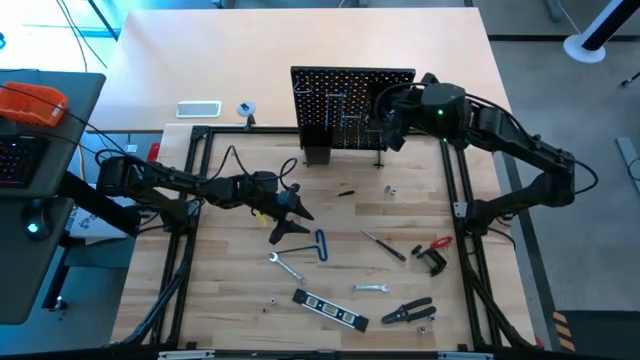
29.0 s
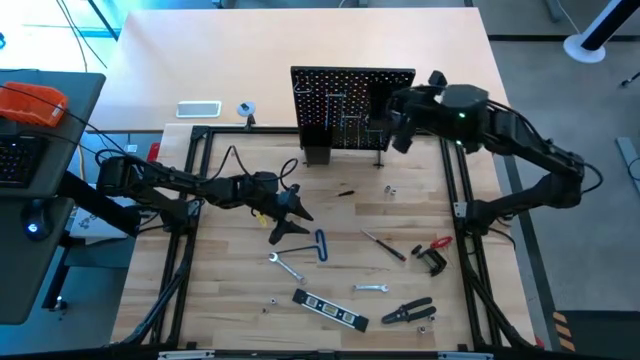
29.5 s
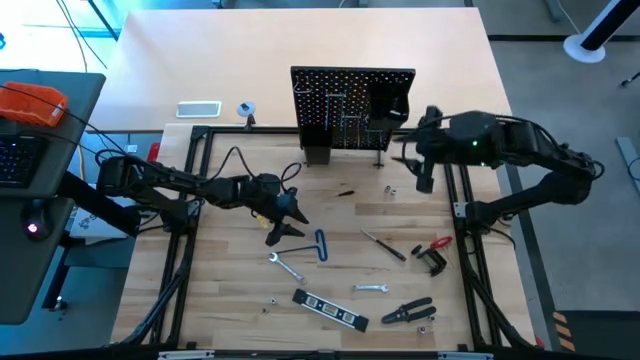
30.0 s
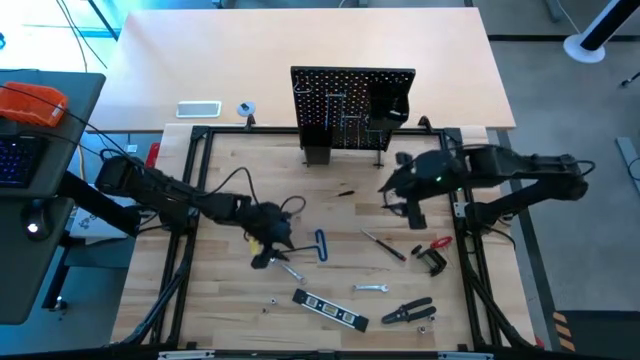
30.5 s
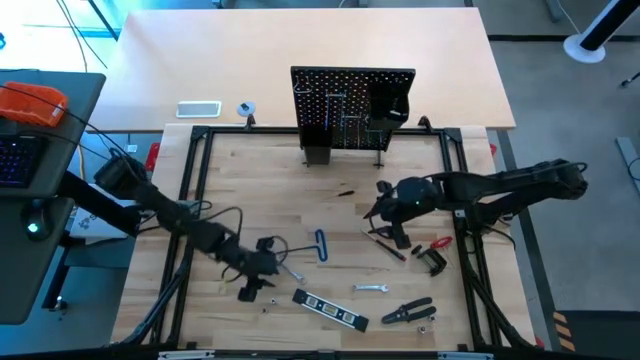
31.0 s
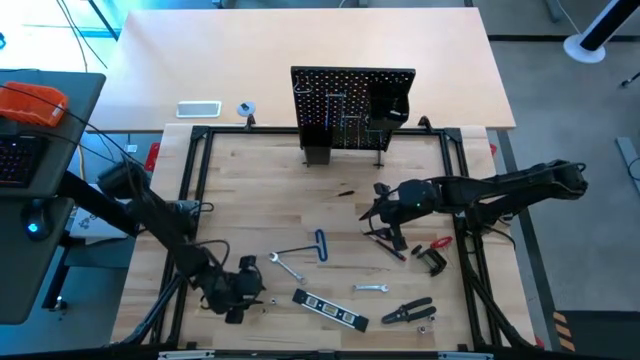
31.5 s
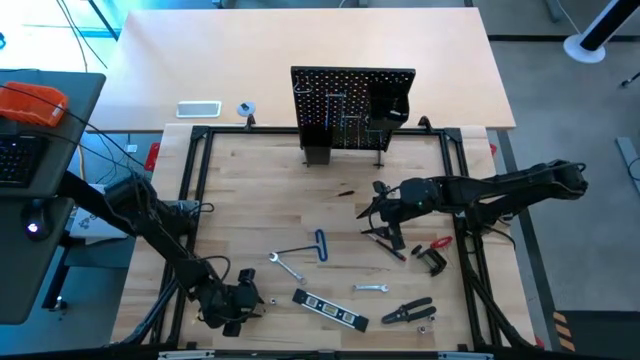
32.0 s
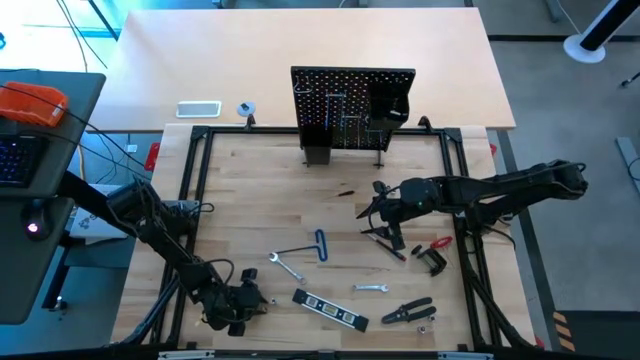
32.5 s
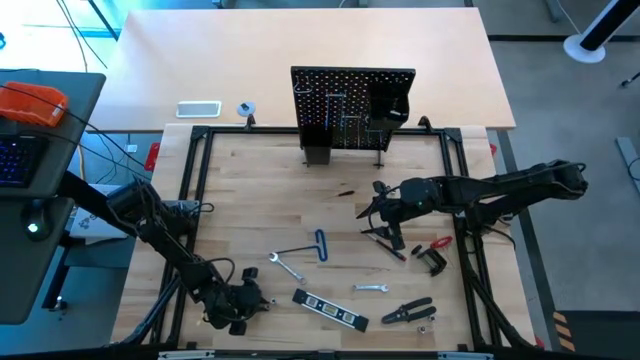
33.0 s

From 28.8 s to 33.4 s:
Task: Hang tools onto peg board
Put the bolts on the pegboard

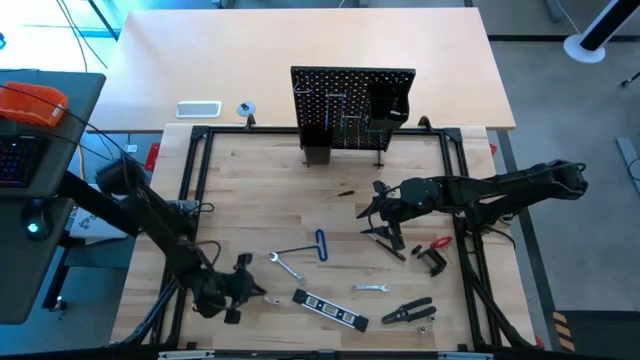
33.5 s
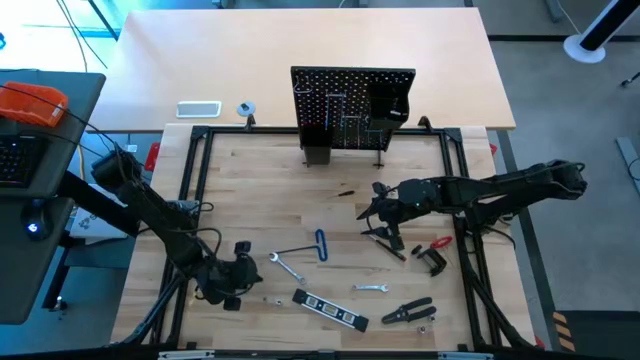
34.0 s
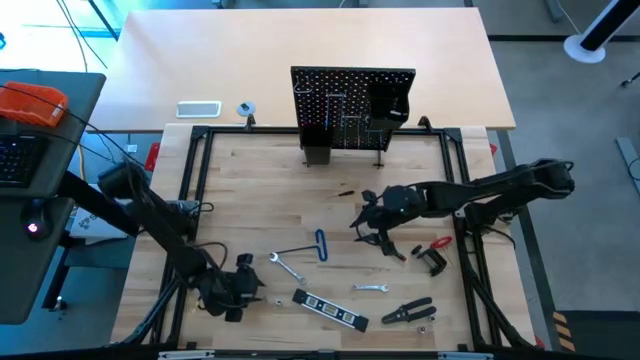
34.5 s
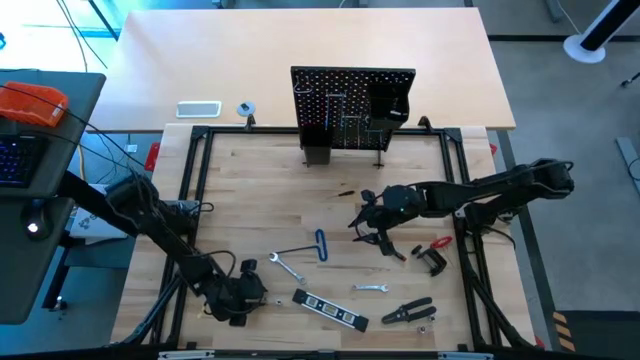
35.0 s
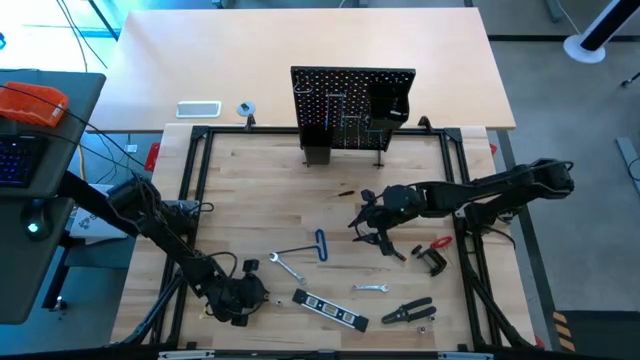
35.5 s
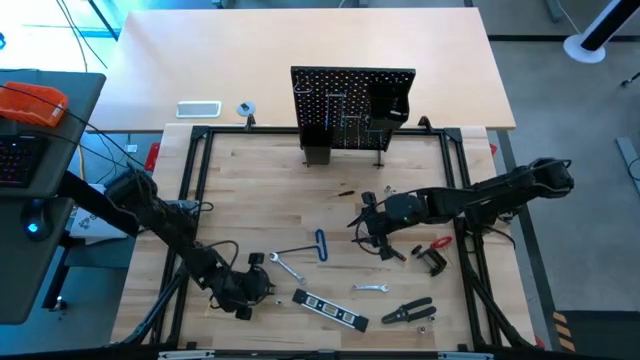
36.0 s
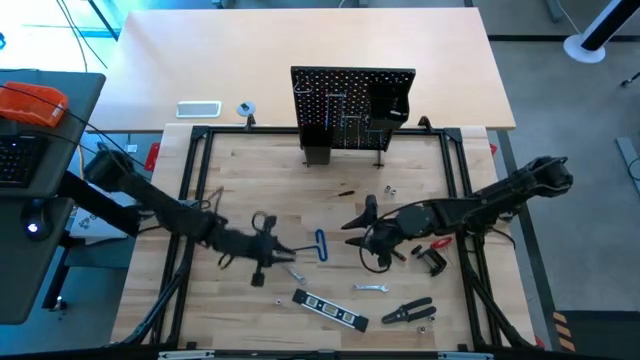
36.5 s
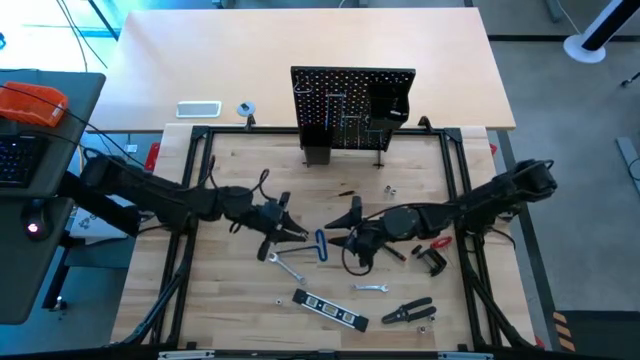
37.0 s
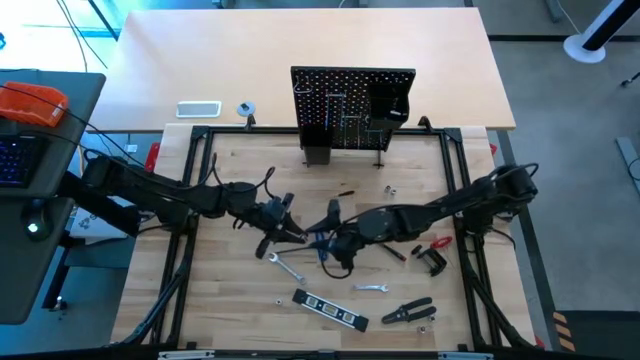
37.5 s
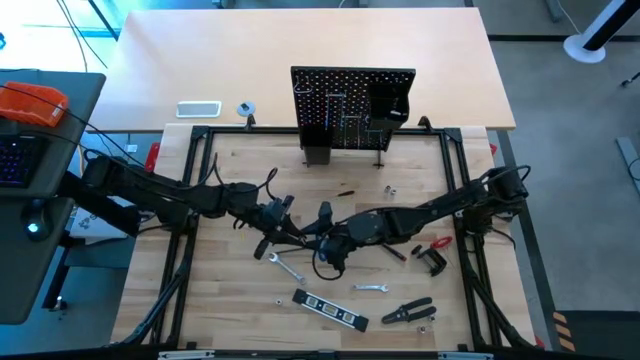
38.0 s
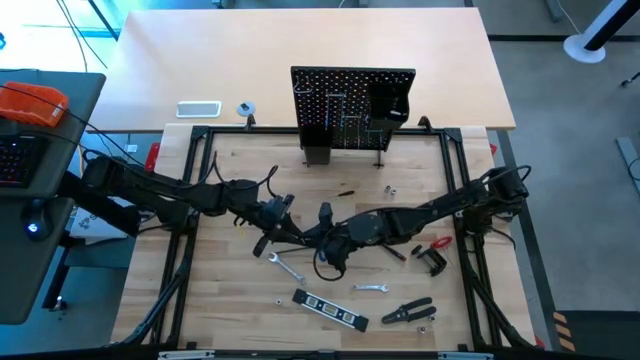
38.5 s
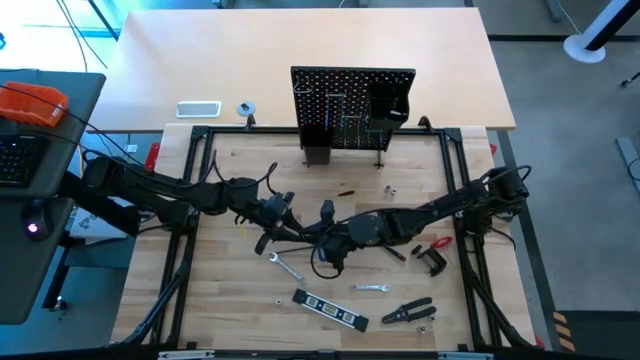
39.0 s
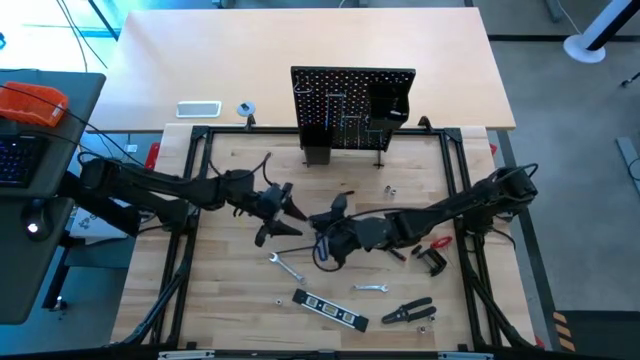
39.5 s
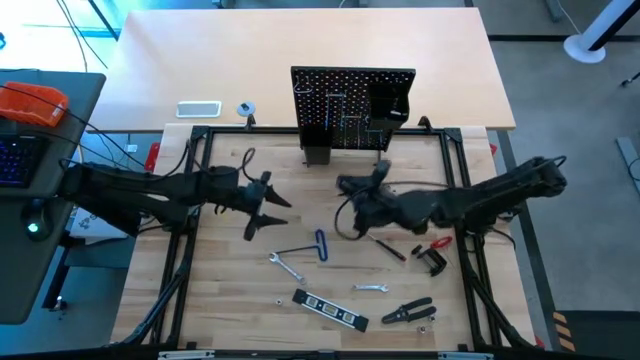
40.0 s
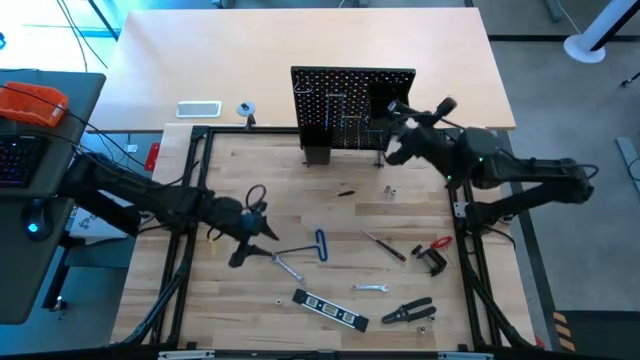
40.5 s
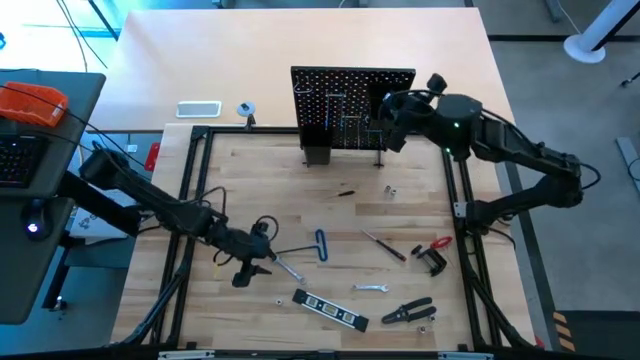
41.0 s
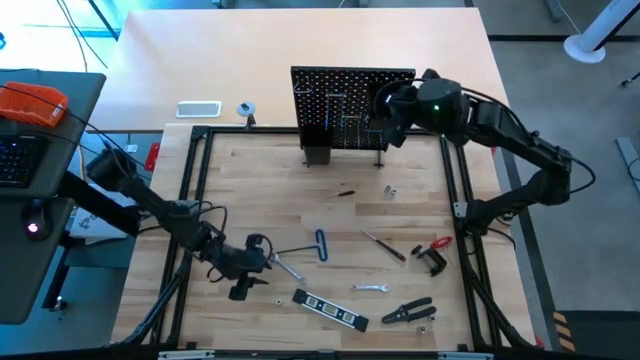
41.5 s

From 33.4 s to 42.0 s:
Put the bolts on the pegboard

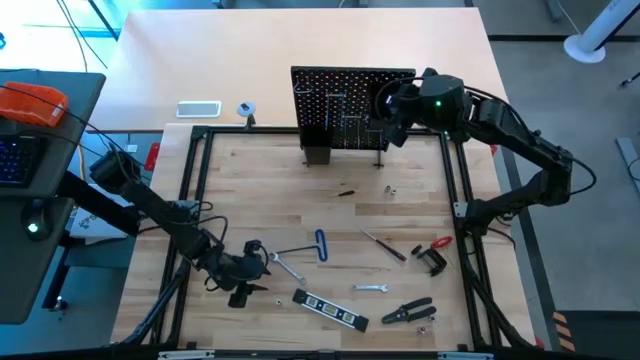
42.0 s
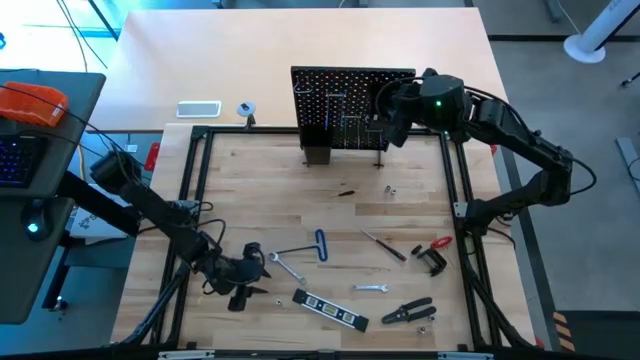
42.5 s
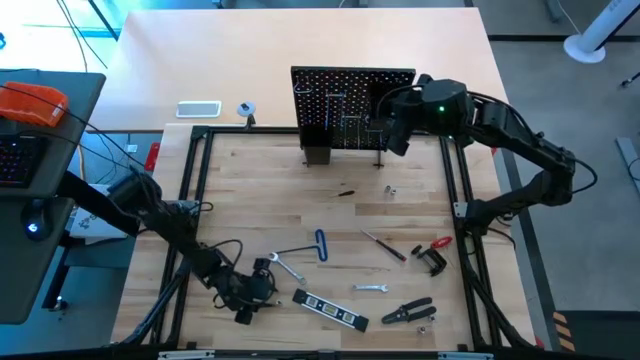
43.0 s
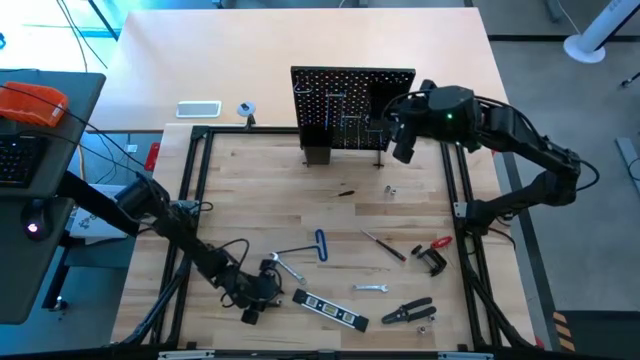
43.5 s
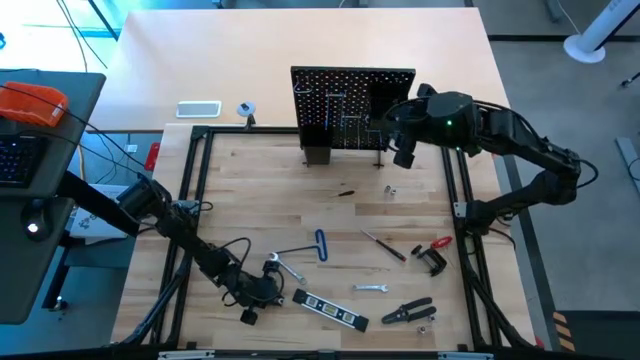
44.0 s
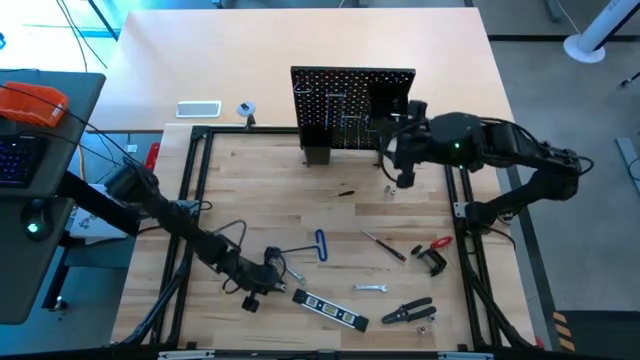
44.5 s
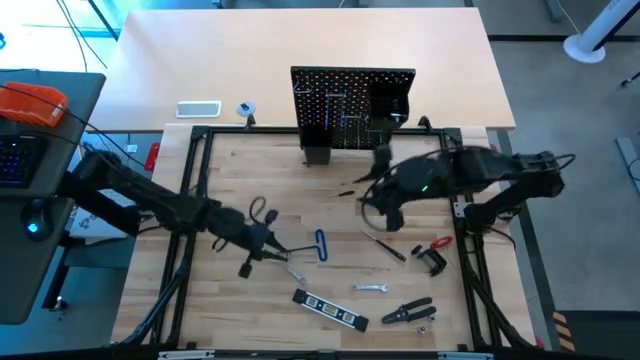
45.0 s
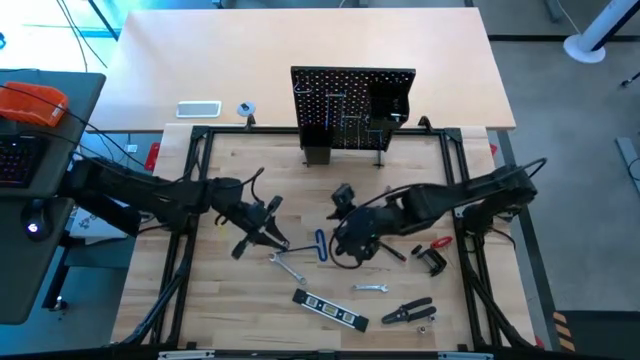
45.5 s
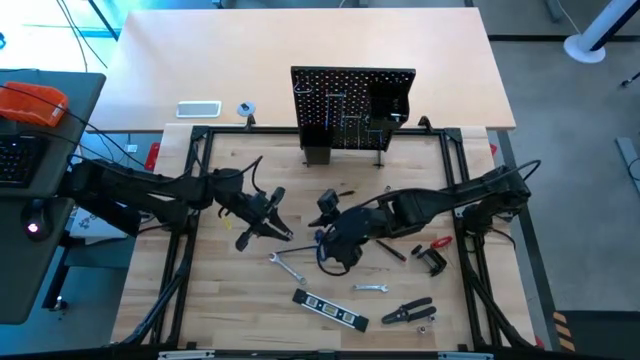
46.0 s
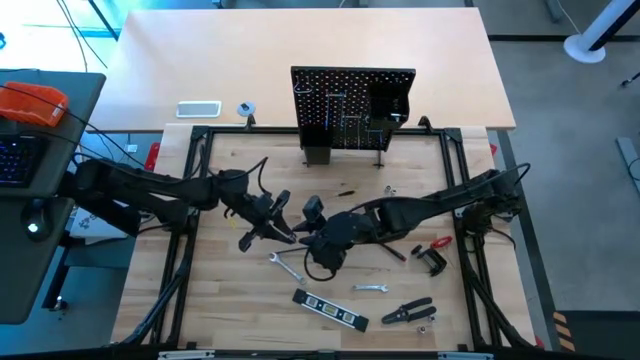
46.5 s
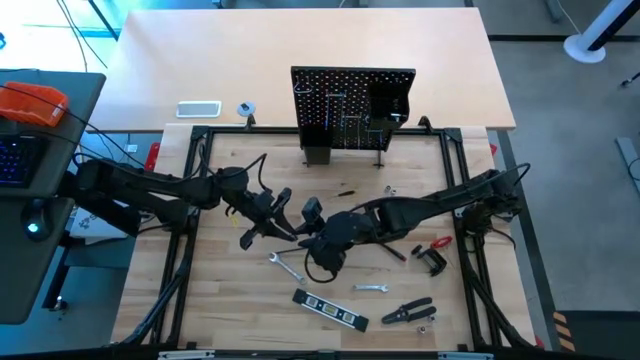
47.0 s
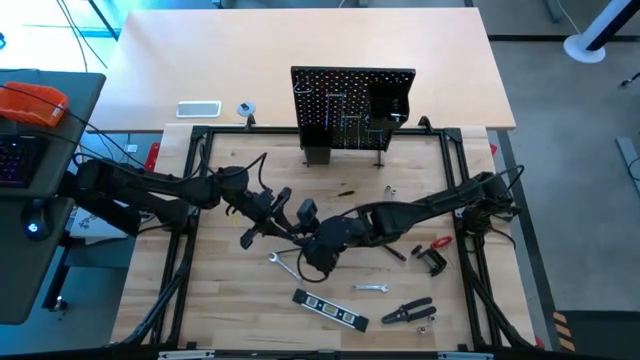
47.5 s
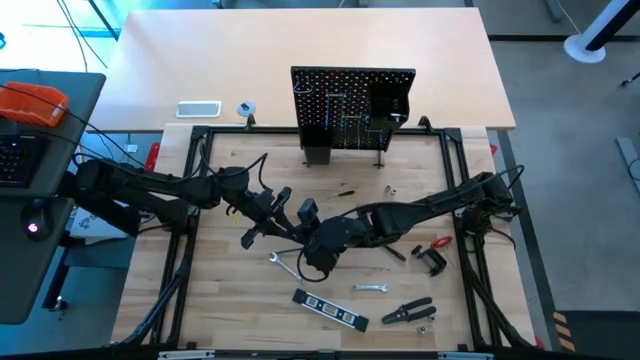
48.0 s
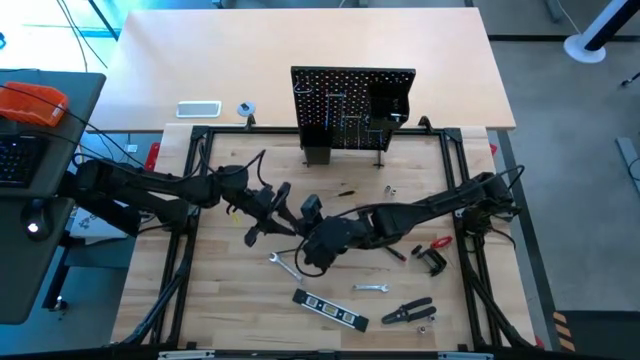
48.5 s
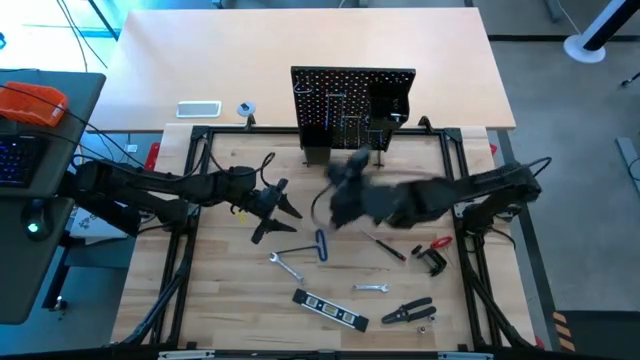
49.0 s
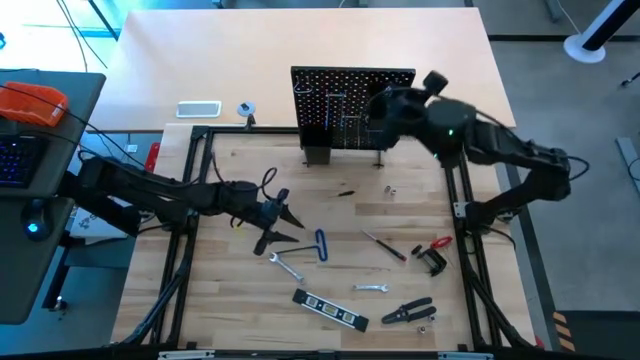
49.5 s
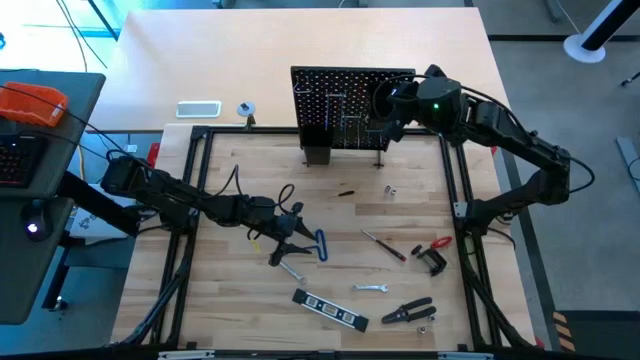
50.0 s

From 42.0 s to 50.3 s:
Put the bolts on the pegboard
